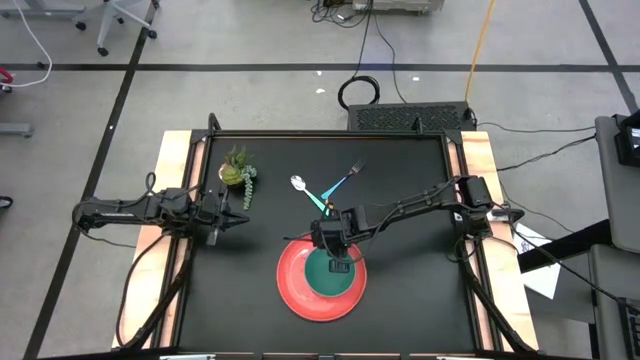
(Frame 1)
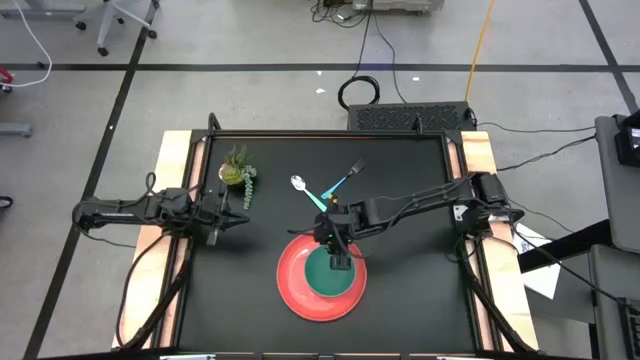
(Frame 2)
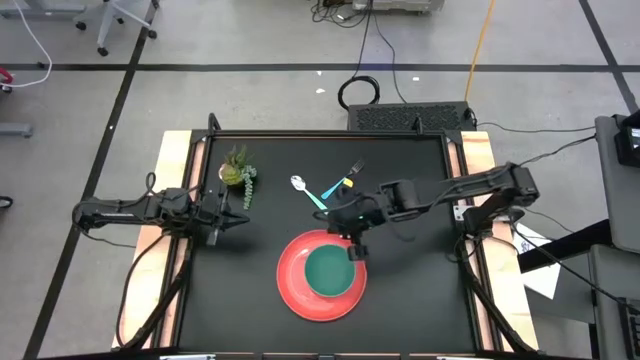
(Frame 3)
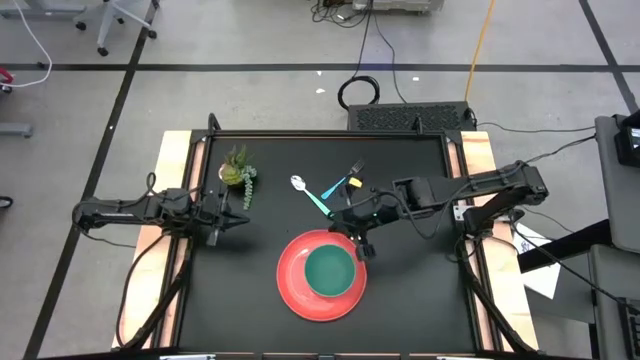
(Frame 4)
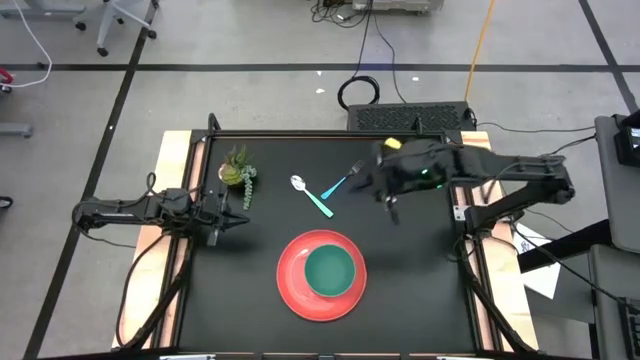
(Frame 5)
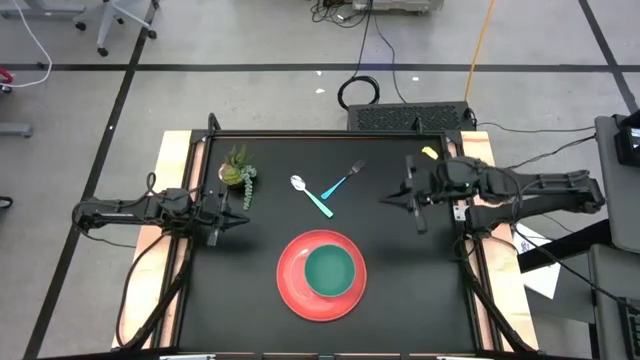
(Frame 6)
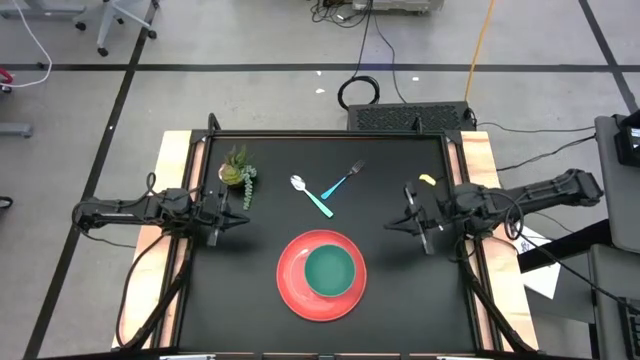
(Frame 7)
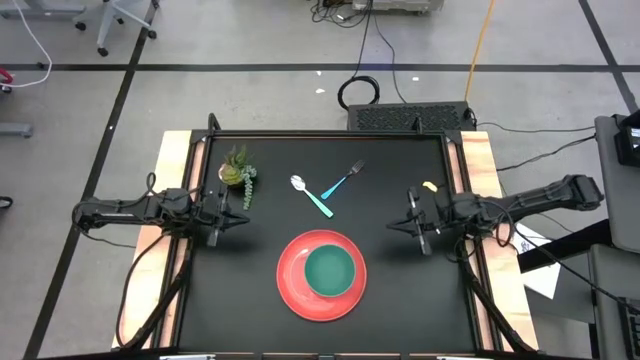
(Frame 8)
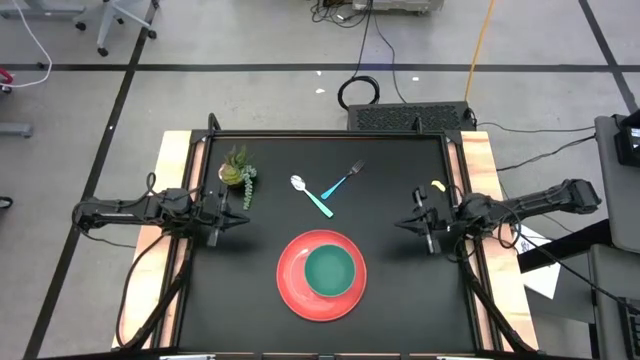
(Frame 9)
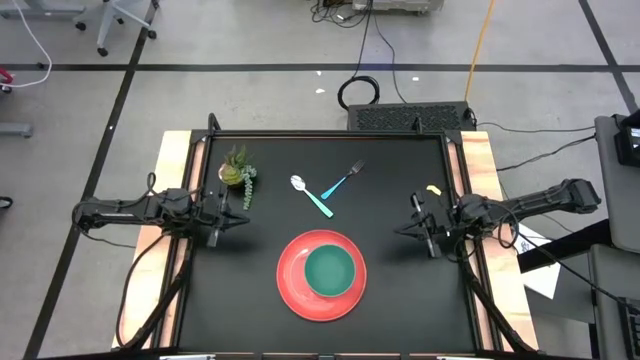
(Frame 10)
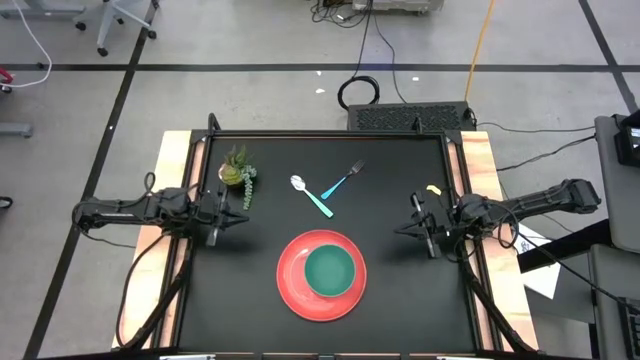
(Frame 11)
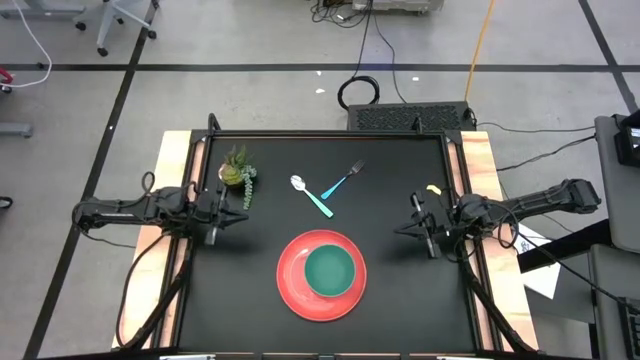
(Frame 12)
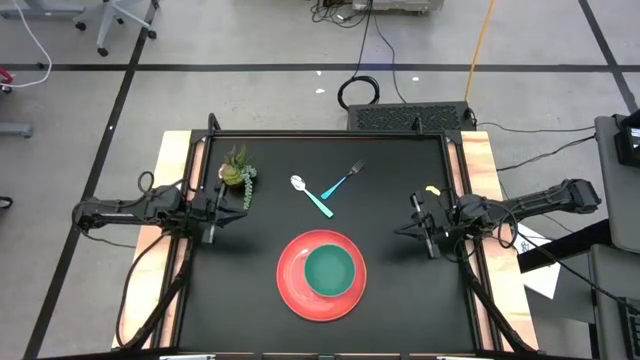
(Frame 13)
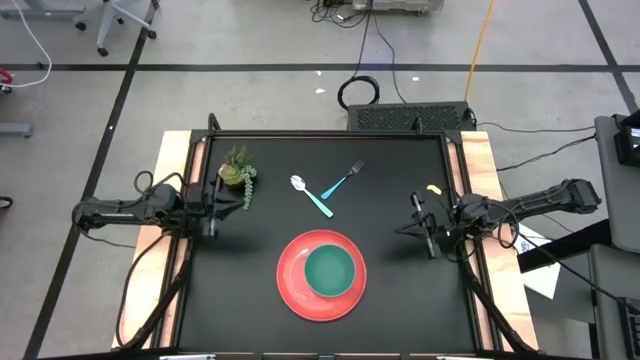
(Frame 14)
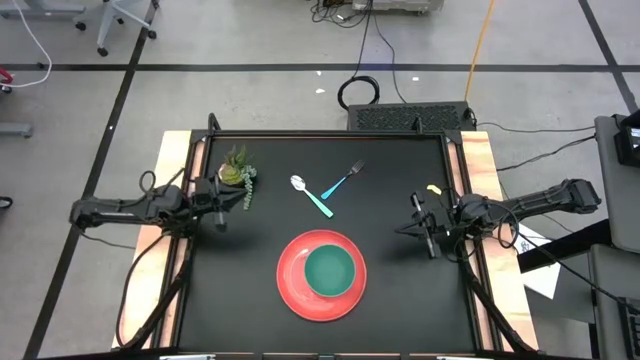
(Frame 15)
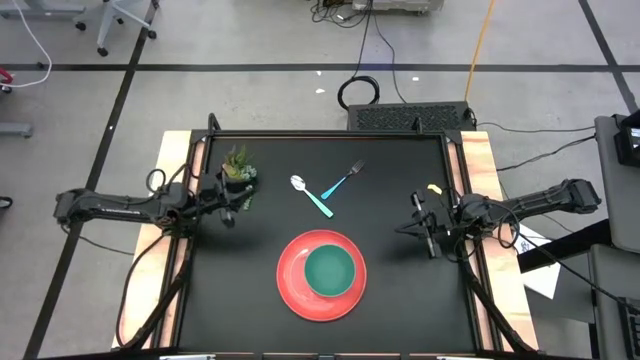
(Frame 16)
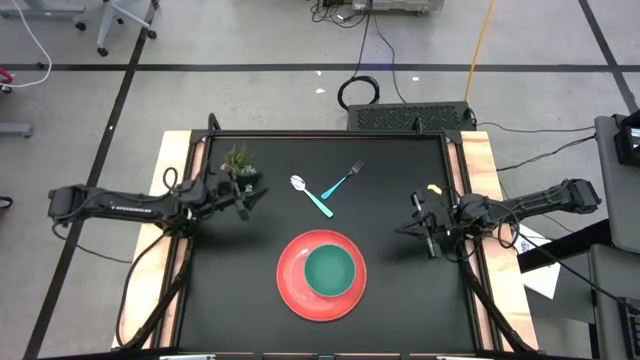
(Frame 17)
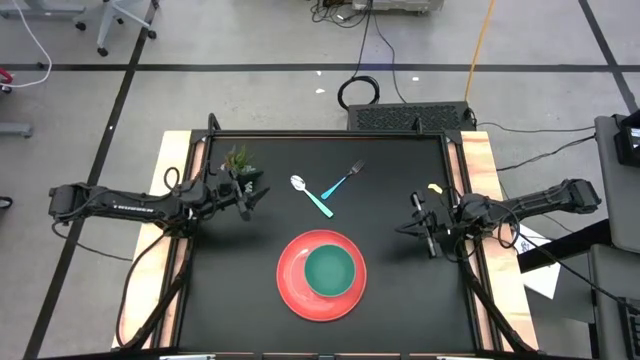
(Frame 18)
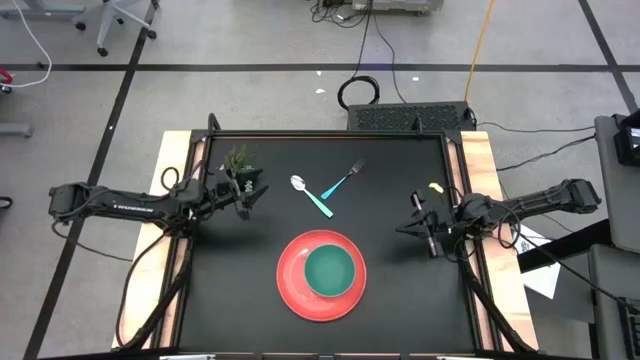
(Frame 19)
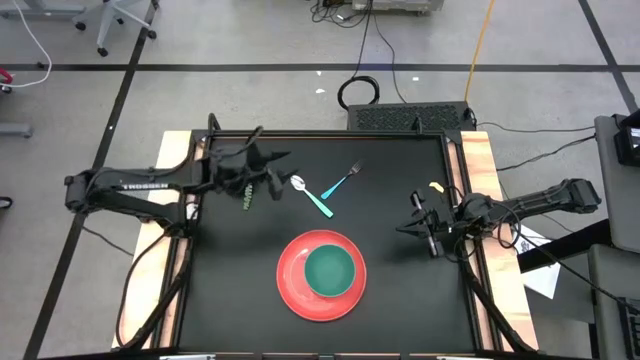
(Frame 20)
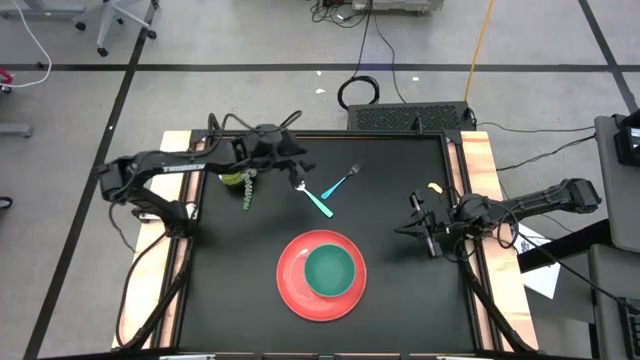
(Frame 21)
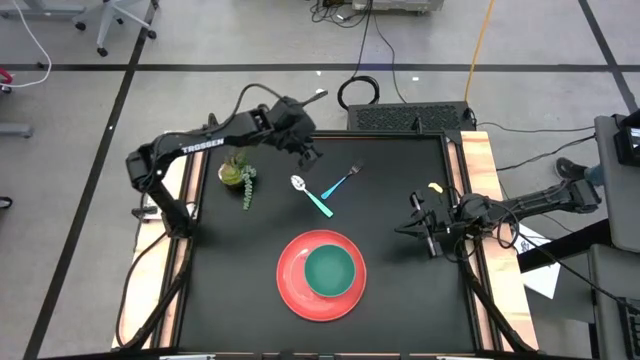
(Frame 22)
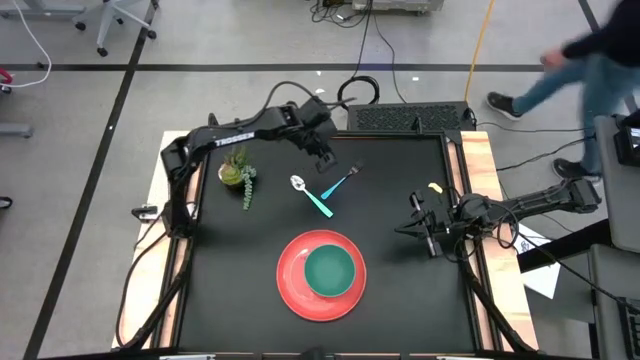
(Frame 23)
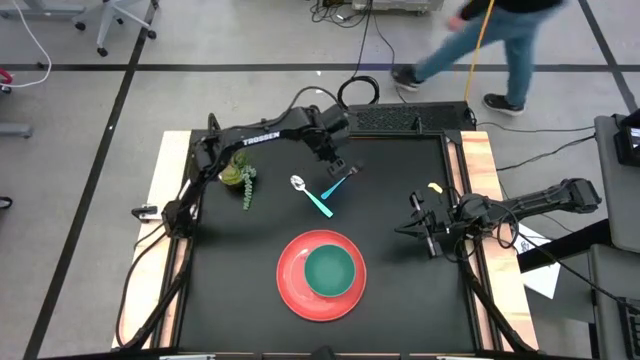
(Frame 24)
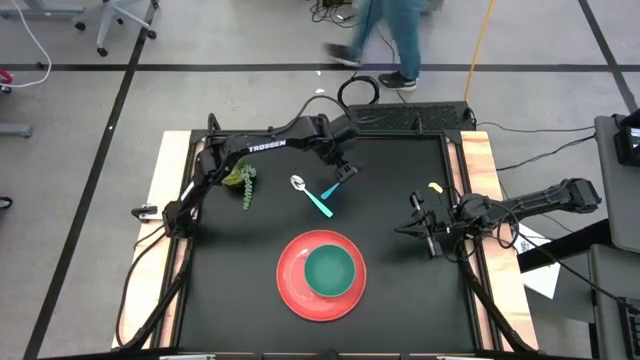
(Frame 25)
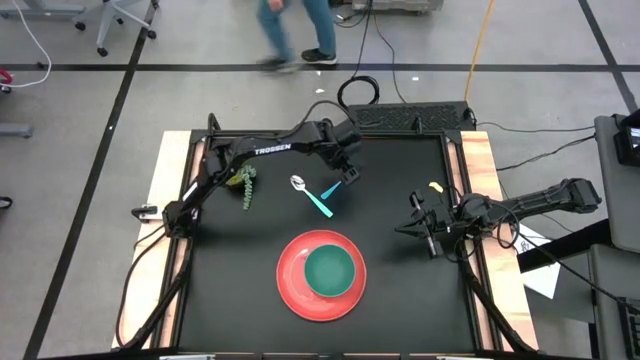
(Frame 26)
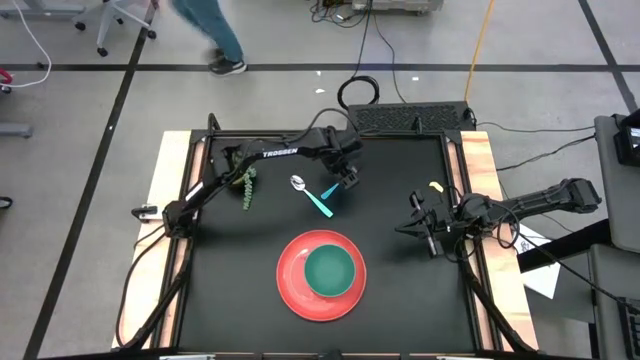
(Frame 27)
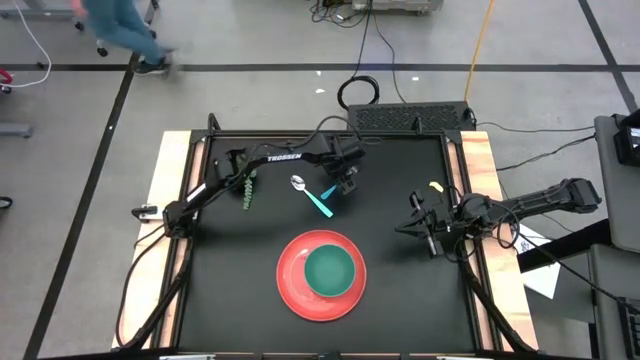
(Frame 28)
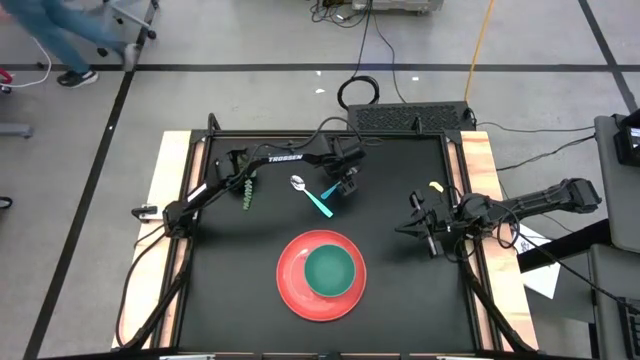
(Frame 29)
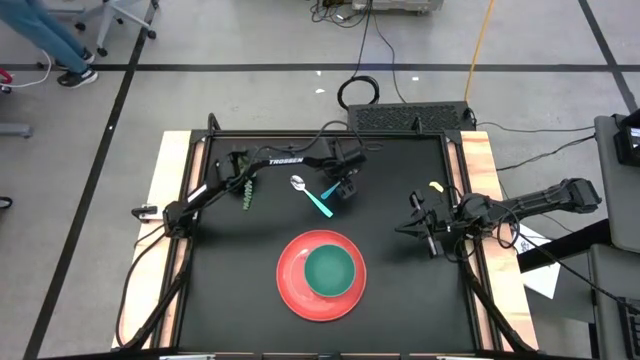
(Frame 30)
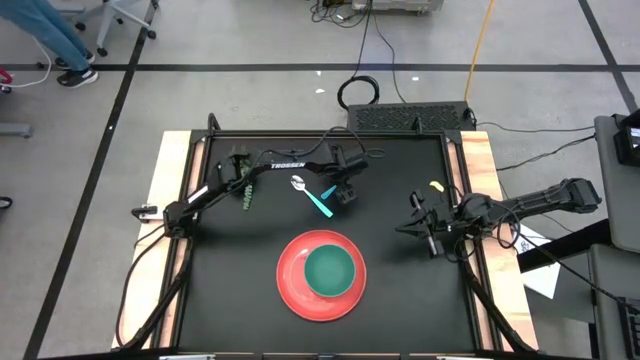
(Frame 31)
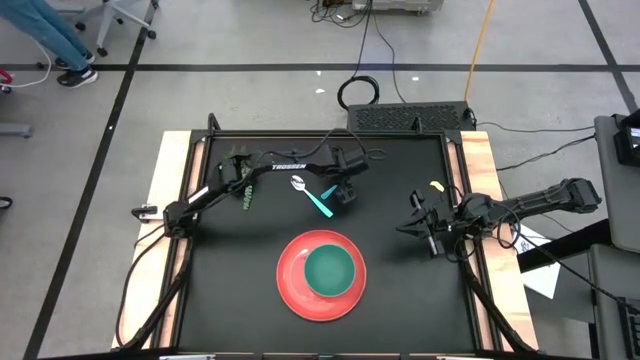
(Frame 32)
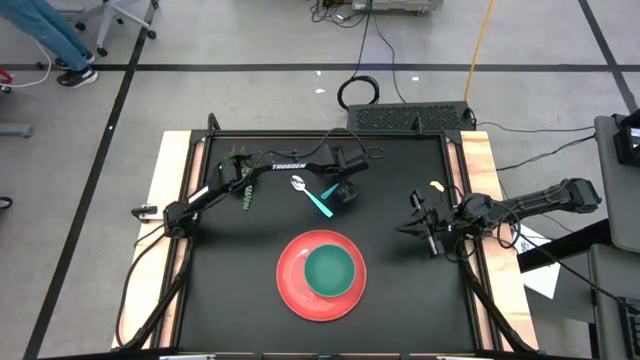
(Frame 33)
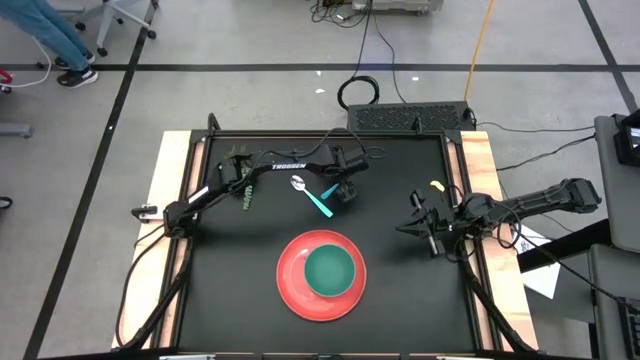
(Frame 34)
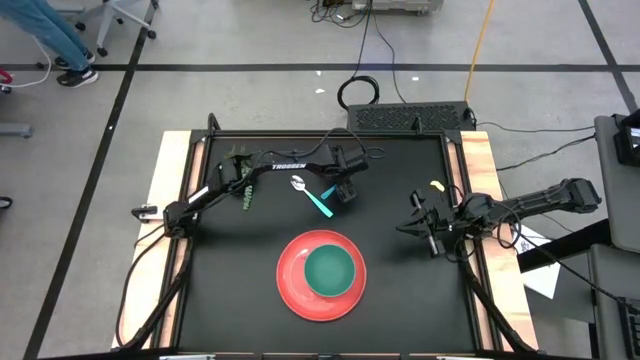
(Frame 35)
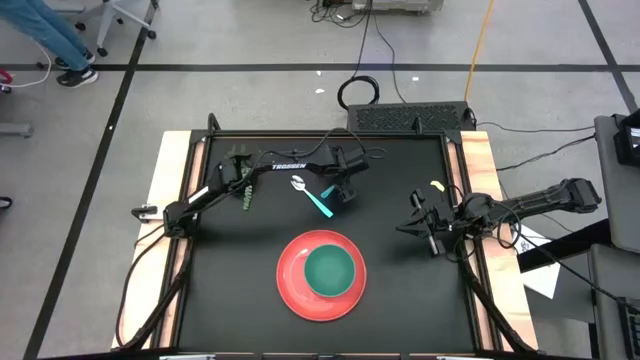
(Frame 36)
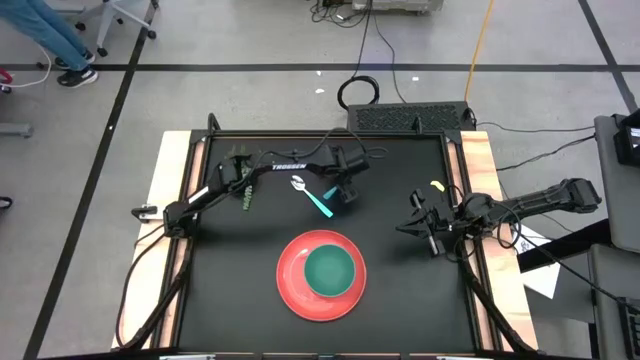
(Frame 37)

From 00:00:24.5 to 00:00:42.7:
Task: Set table place
Put the blue fork on the orange plate to the left of the green bowl

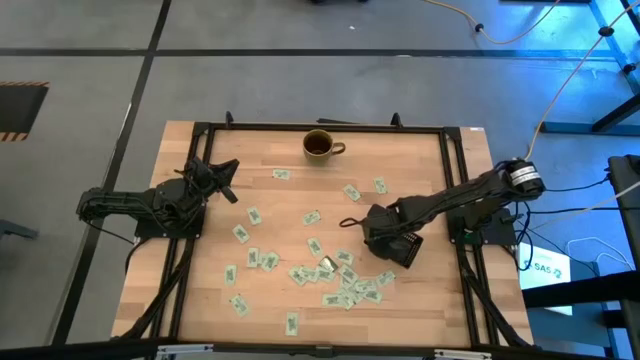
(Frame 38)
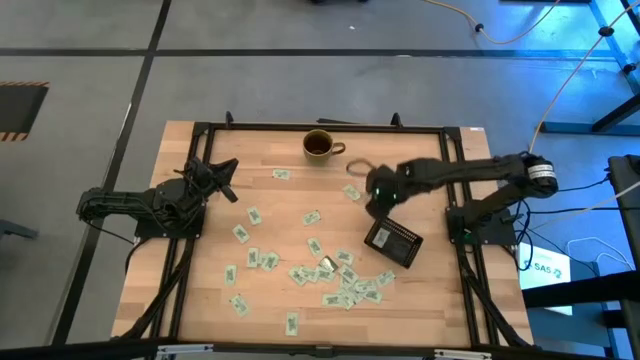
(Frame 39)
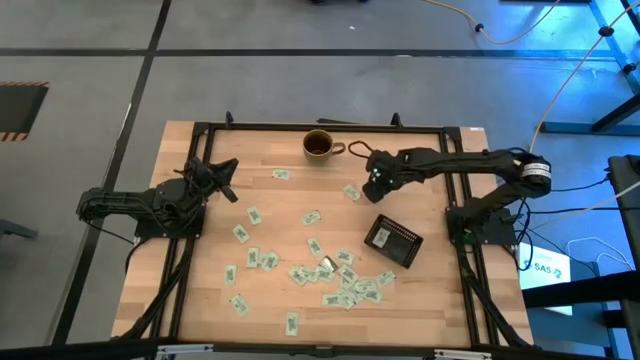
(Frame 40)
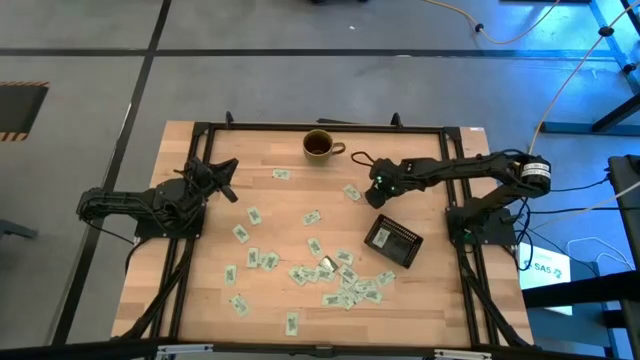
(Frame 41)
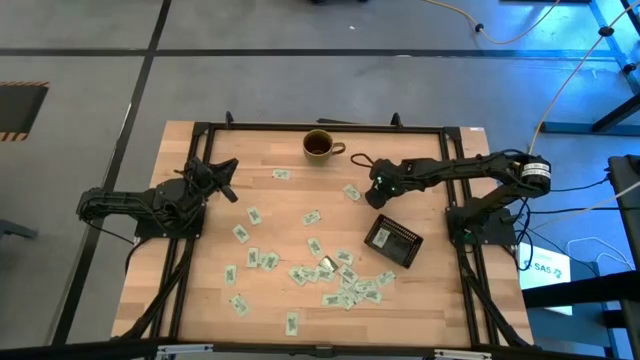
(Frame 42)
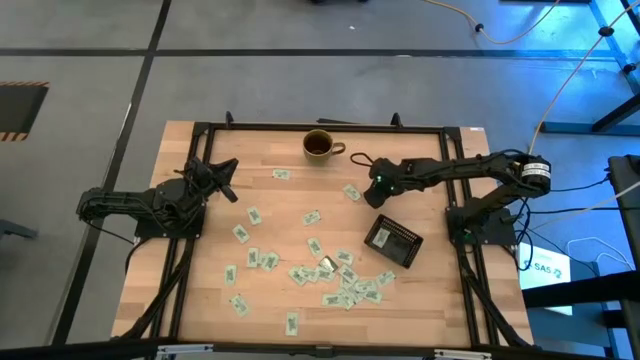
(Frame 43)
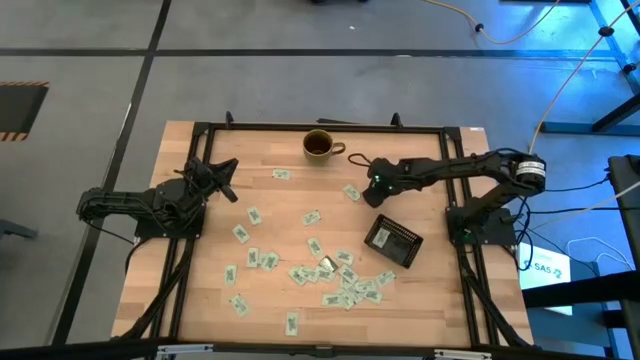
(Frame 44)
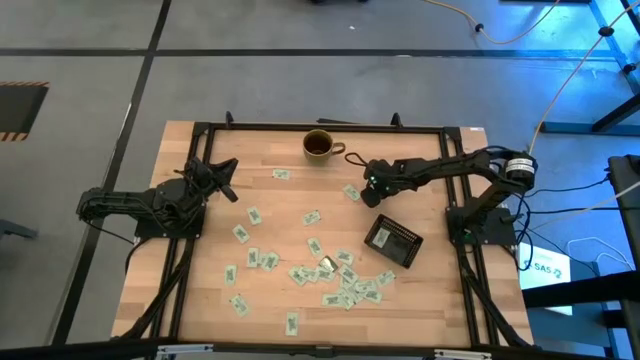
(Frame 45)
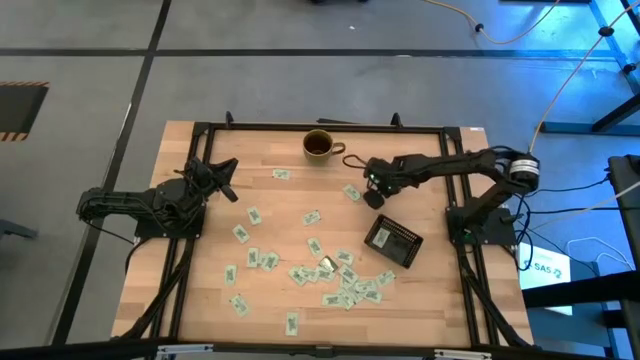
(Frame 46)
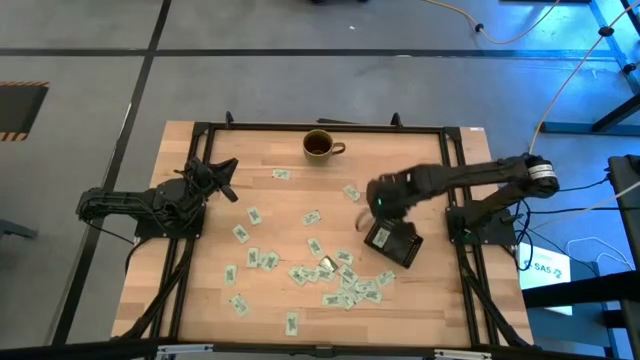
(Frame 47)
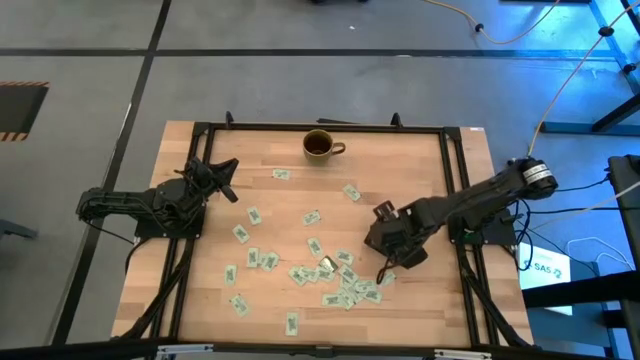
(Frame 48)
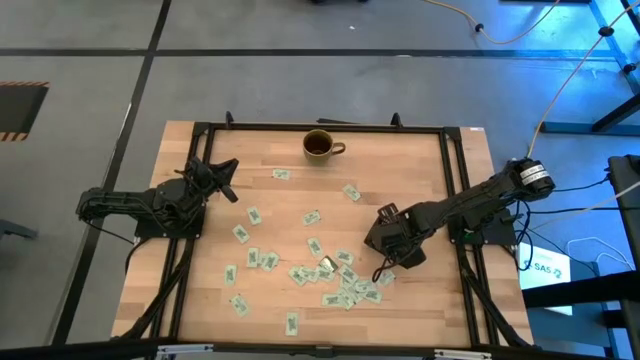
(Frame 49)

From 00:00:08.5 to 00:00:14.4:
Task: Pick and place Stevia / Truvia into bins
Put the stevia packet into the black bin
